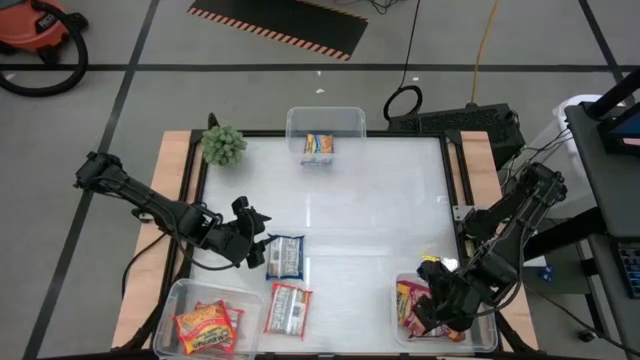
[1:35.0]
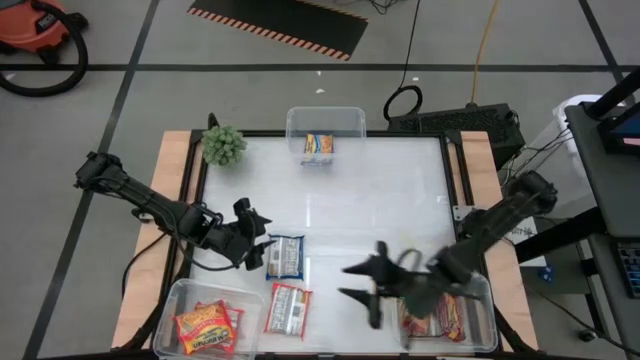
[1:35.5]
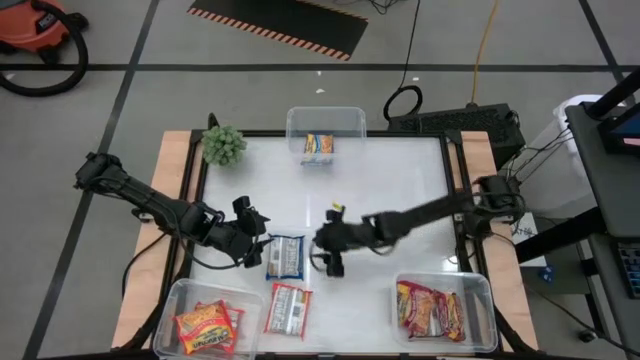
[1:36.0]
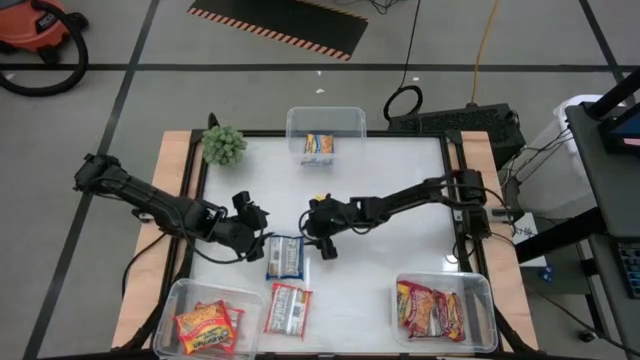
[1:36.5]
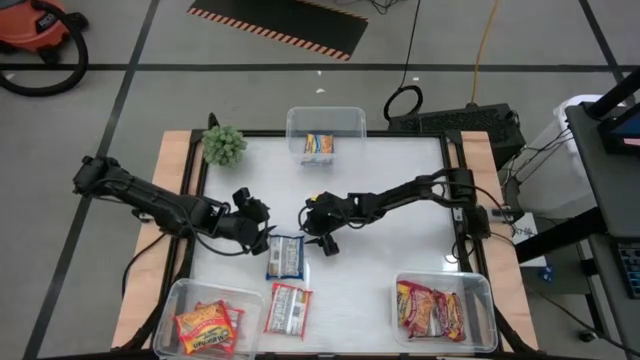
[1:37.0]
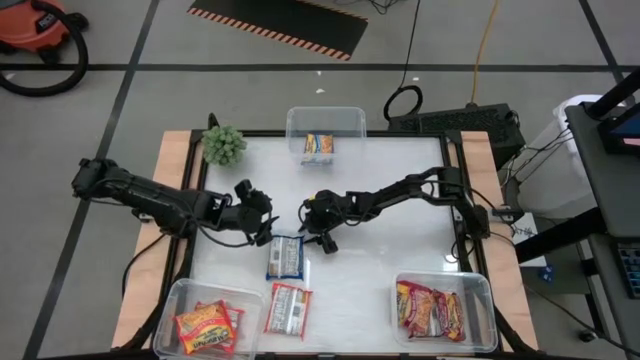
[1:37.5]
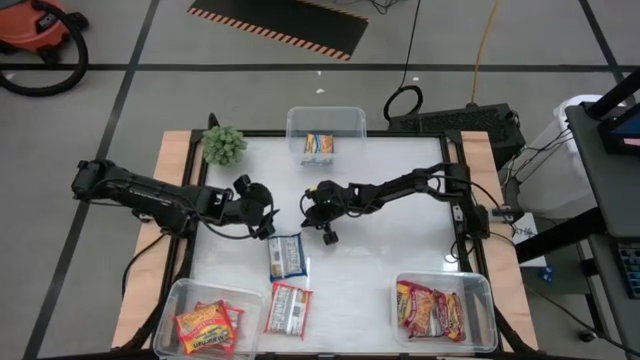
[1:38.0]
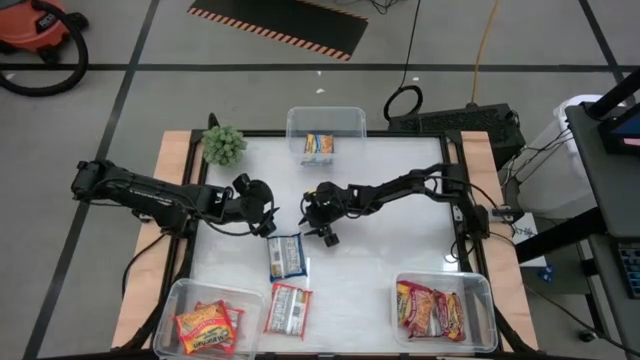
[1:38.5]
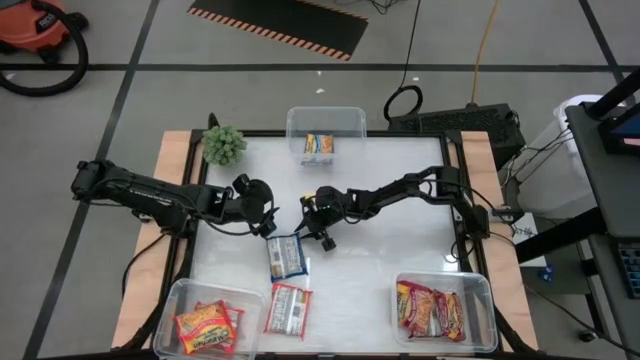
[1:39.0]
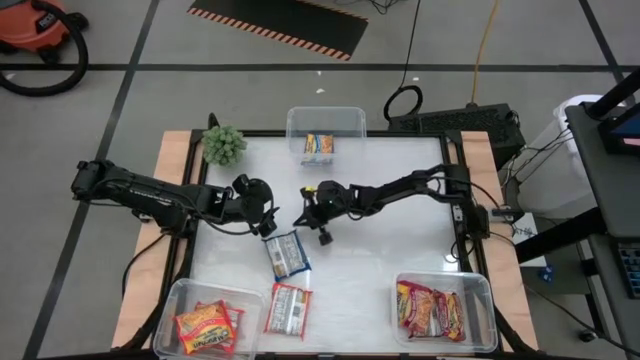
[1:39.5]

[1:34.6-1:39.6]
Task: Sort Maruchan noodles
Put the blue noodle pack into the top transparent bin

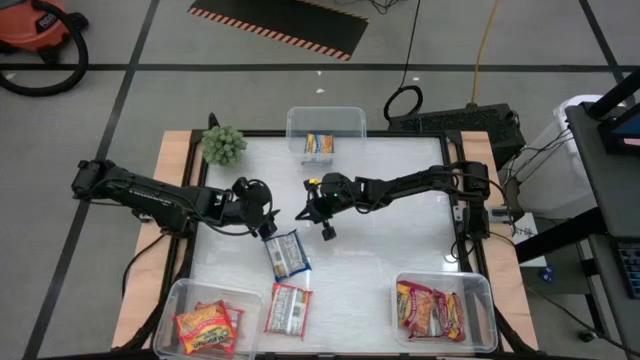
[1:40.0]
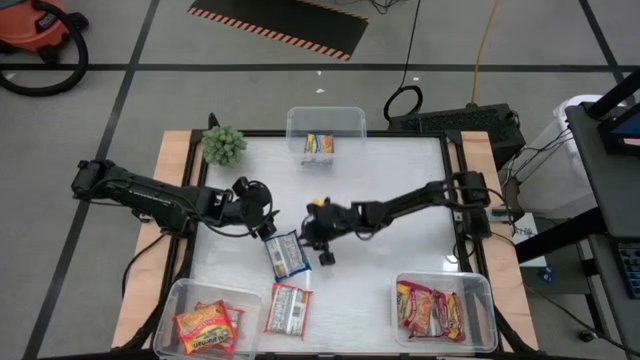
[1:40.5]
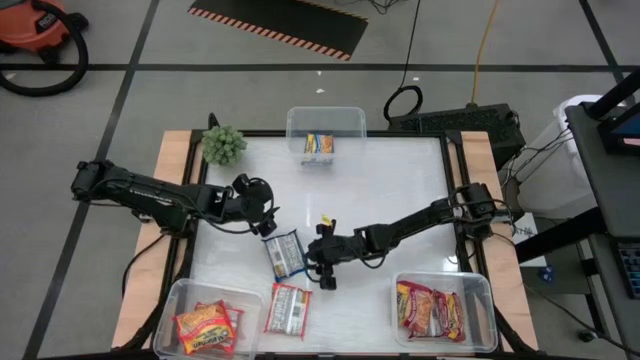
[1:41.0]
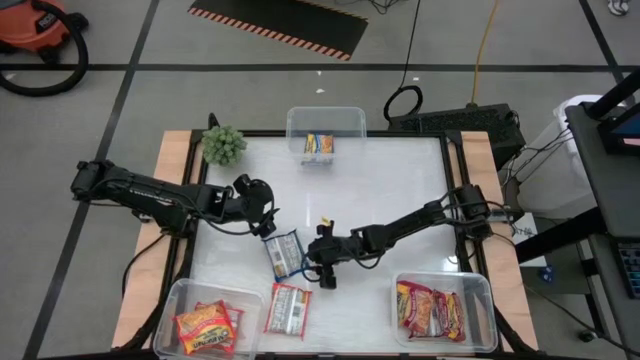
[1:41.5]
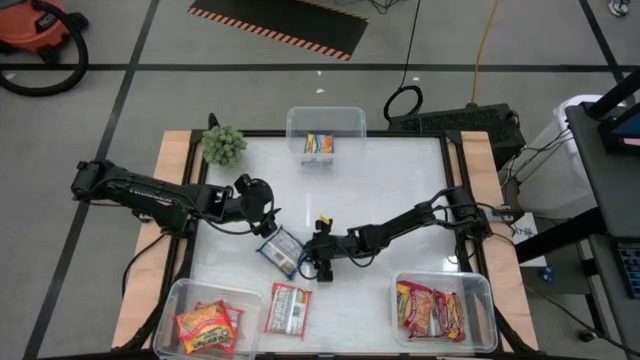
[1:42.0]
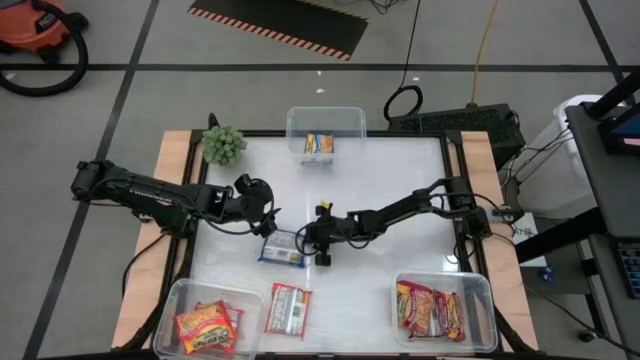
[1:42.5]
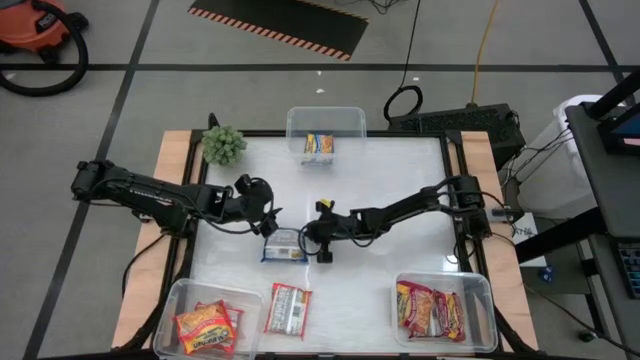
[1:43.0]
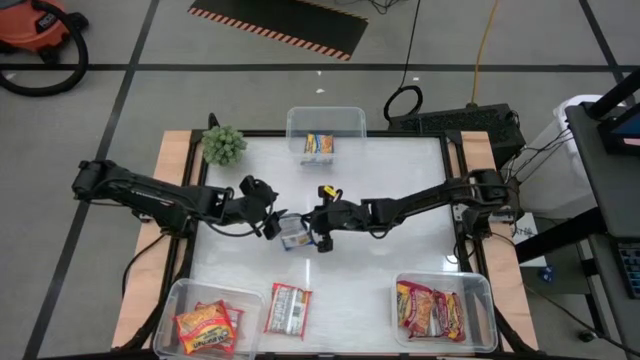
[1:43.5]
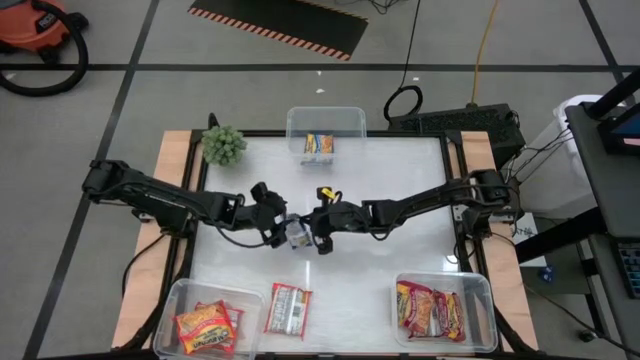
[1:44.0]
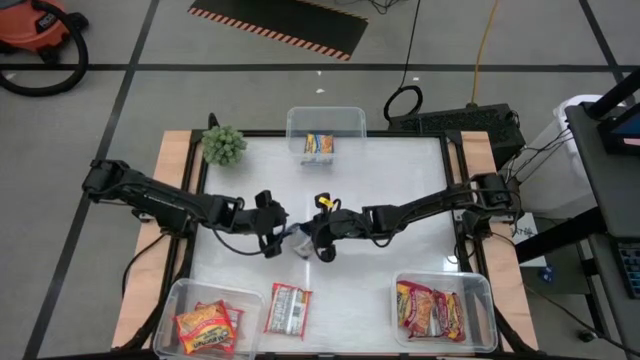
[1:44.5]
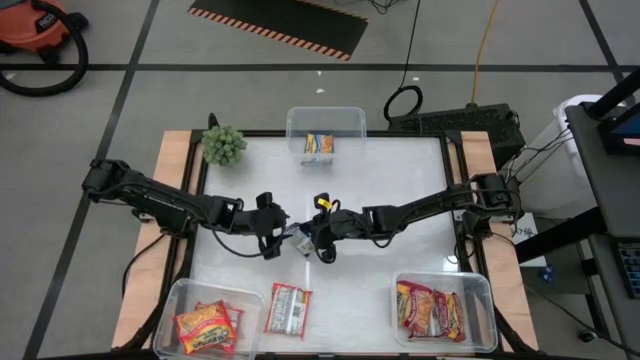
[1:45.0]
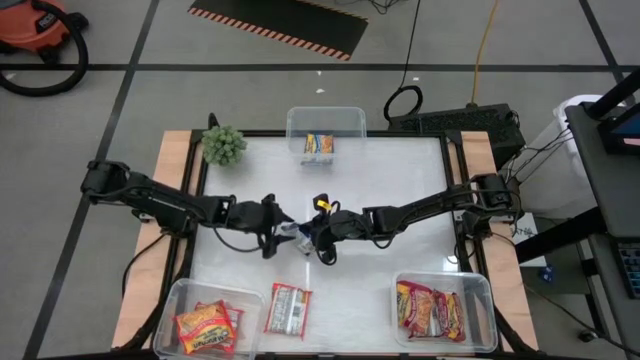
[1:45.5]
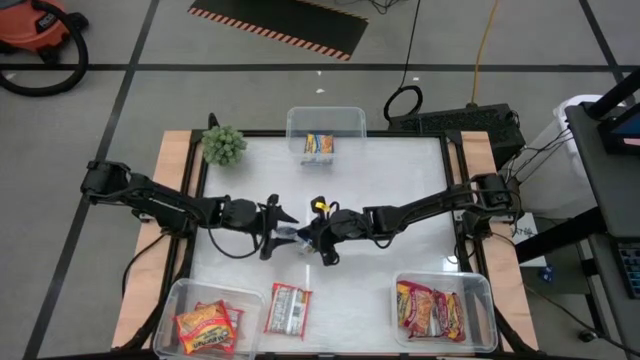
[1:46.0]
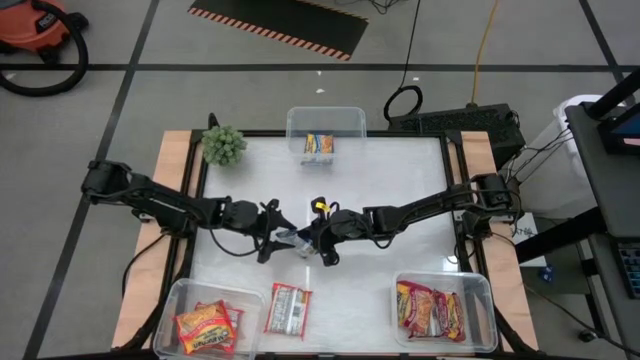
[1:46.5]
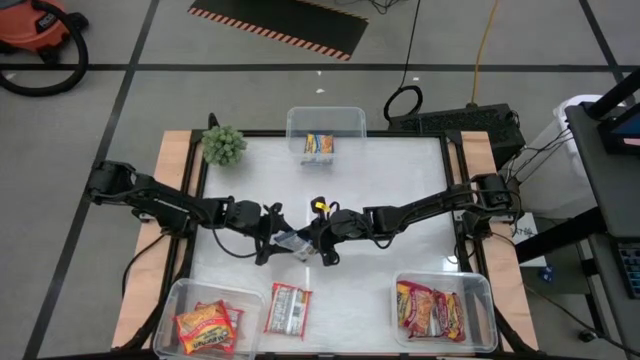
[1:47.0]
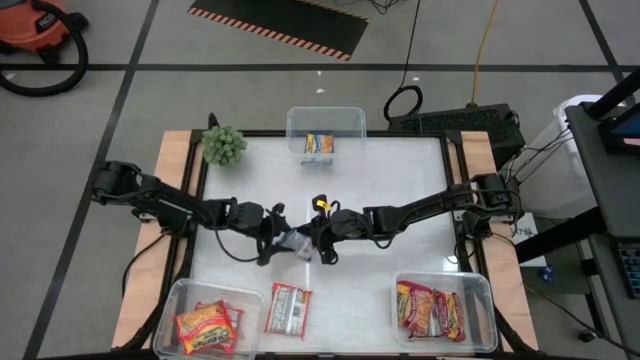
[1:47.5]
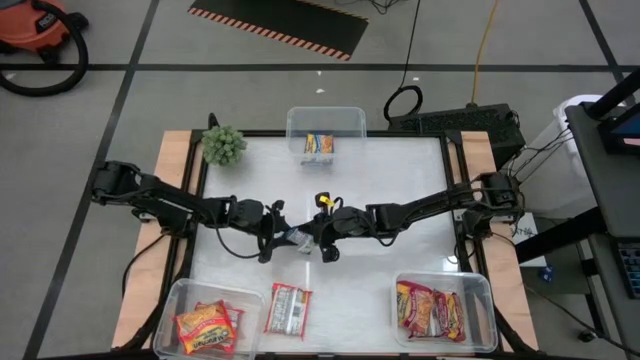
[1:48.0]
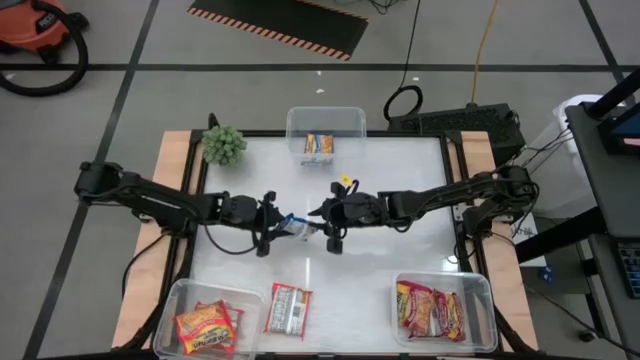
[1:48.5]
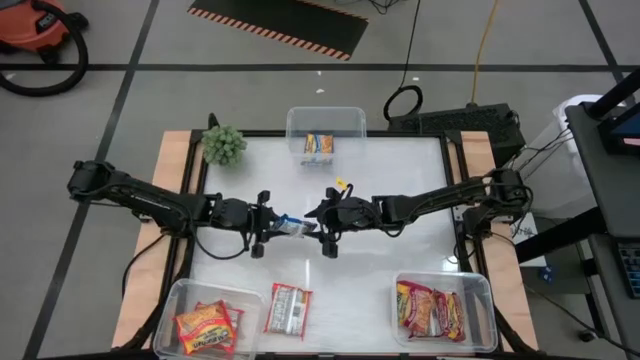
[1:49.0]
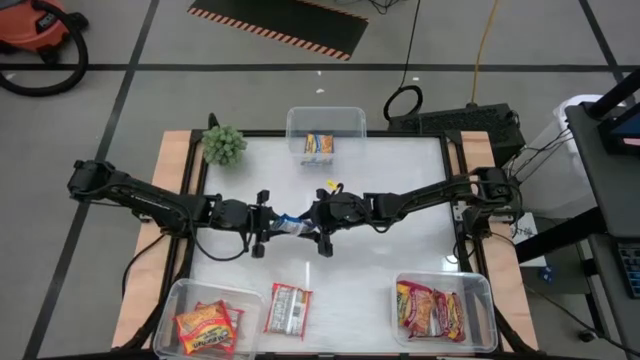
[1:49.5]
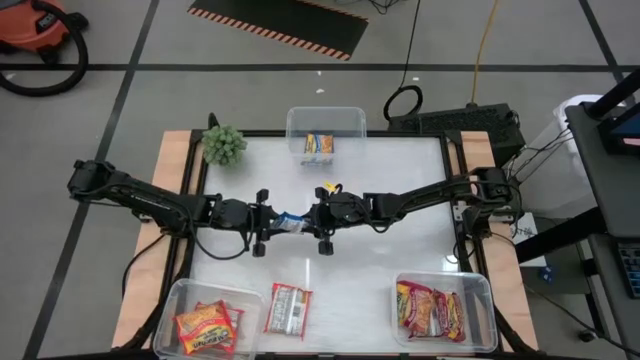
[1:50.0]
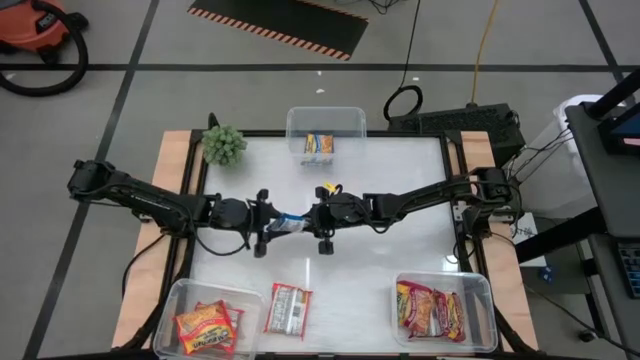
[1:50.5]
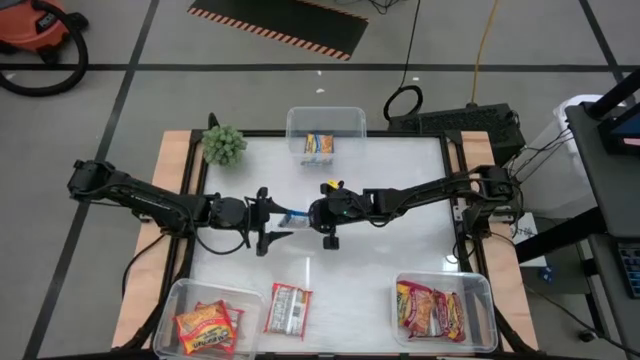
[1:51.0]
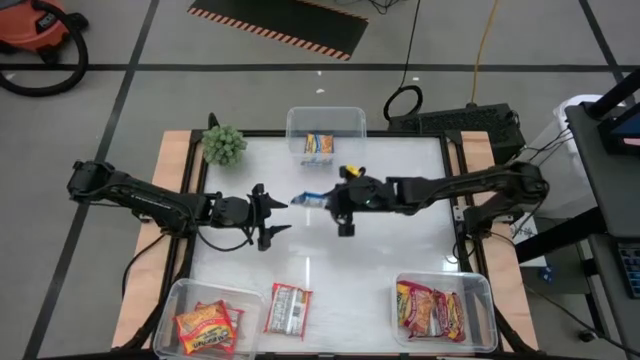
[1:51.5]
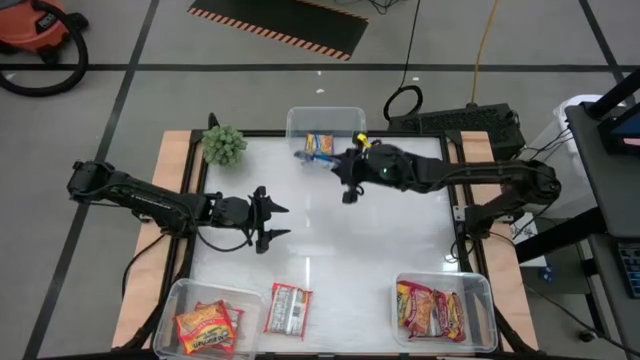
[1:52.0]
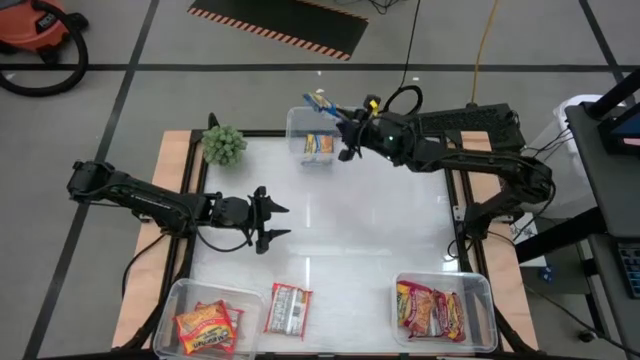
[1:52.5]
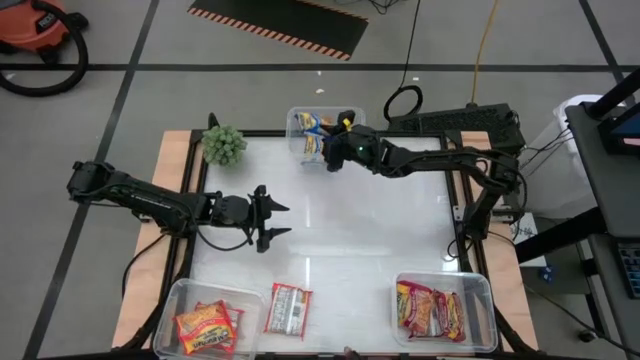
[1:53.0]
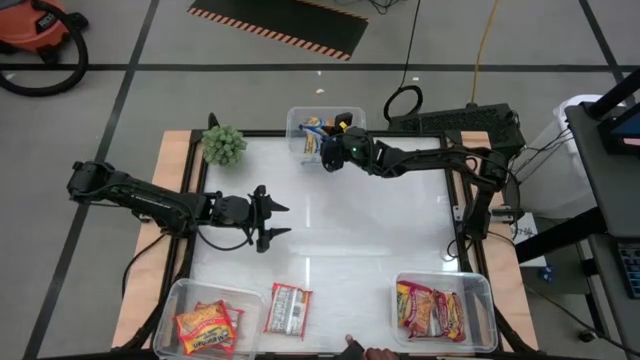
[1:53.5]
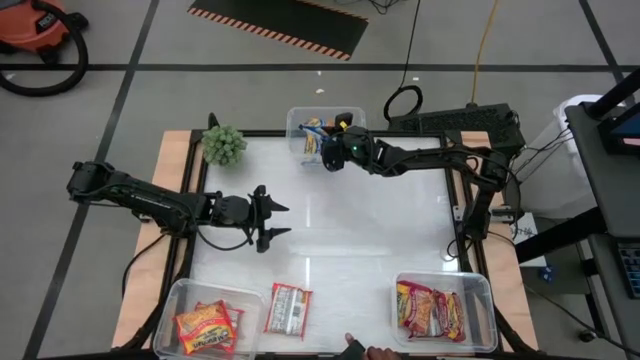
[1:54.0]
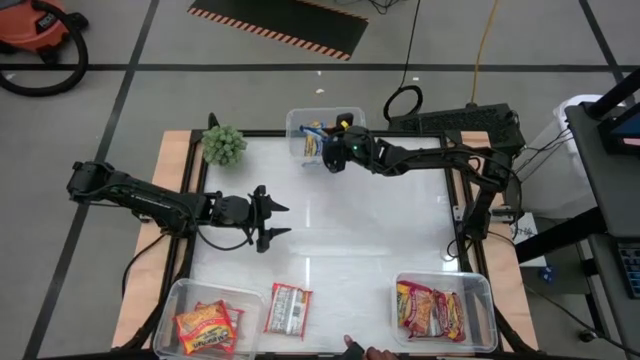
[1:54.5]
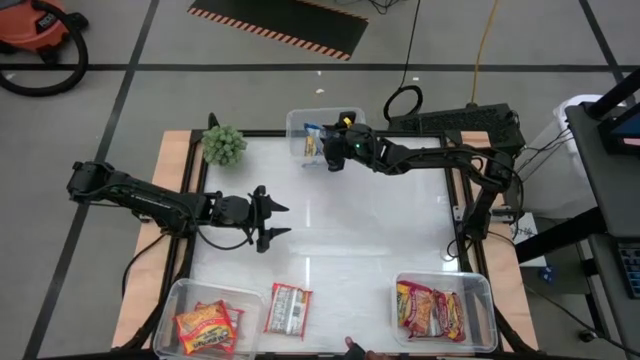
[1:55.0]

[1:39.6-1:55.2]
Put the blue noodle pack into the top transparent bin

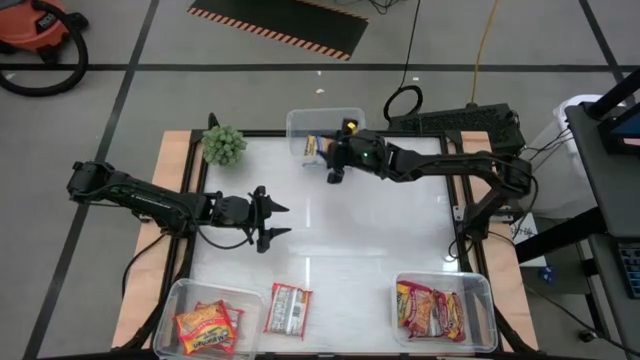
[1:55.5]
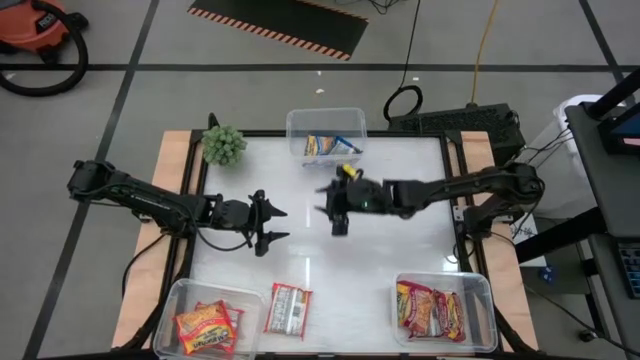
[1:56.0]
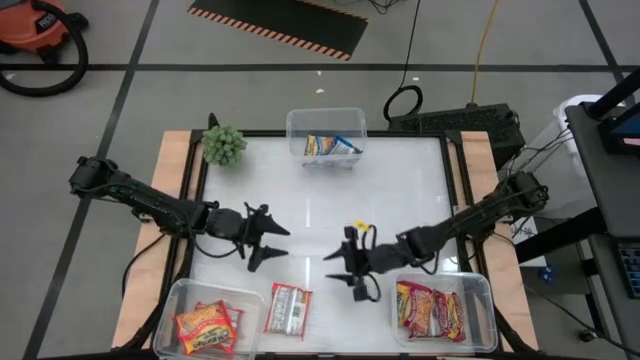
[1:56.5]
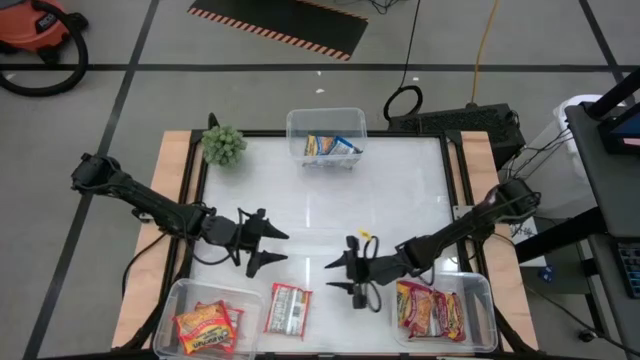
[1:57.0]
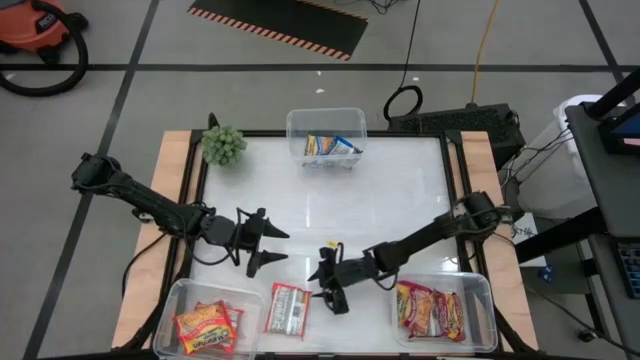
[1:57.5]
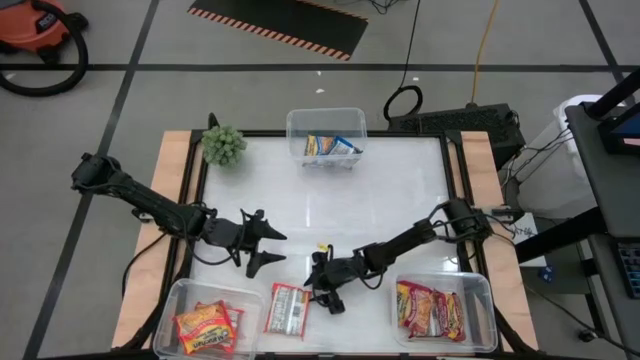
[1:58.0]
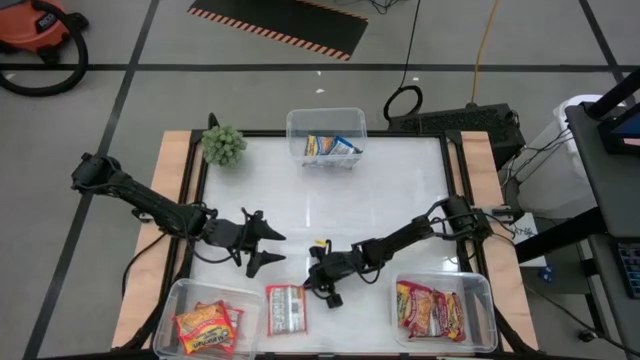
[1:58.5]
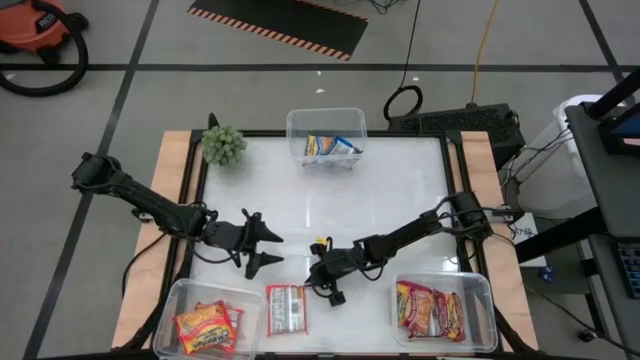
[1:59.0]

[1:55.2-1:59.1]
Put the orange noodle pack into the left transparent bin
